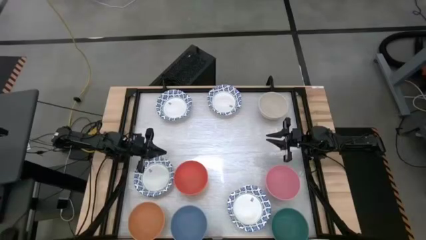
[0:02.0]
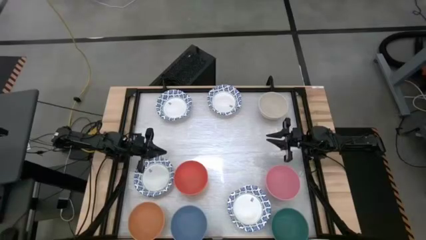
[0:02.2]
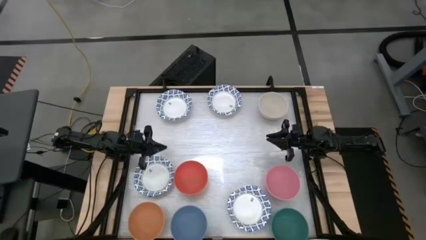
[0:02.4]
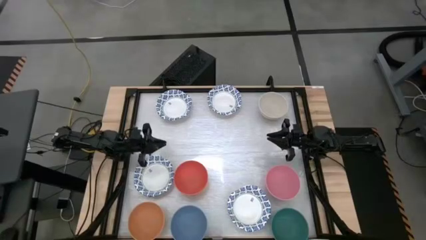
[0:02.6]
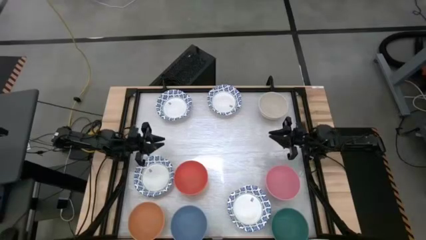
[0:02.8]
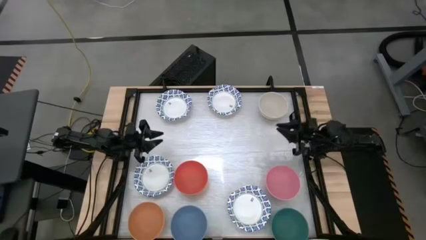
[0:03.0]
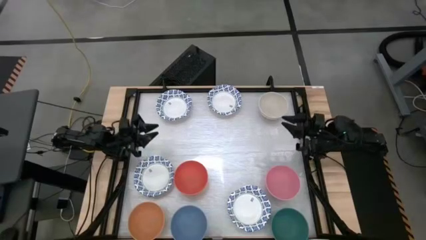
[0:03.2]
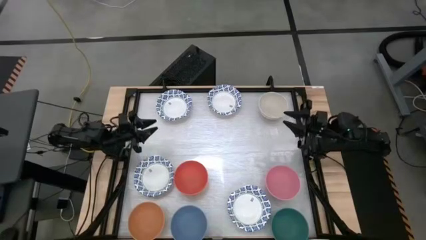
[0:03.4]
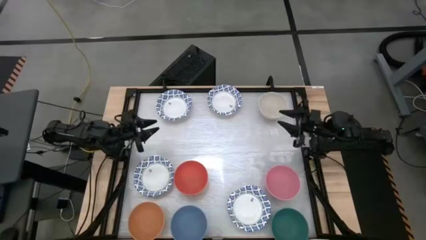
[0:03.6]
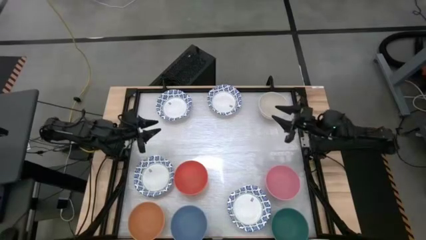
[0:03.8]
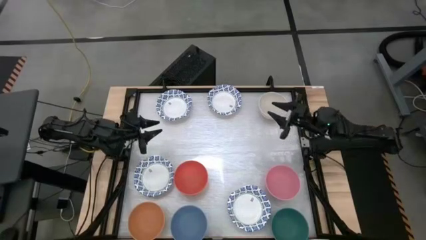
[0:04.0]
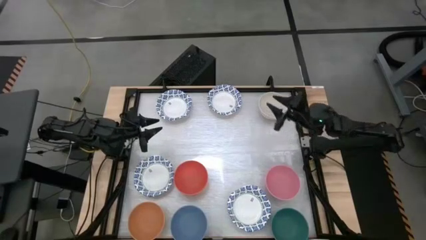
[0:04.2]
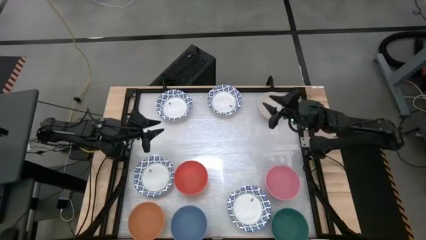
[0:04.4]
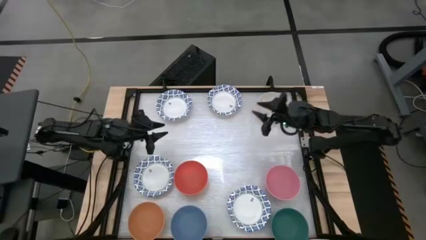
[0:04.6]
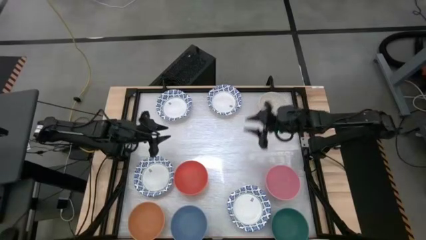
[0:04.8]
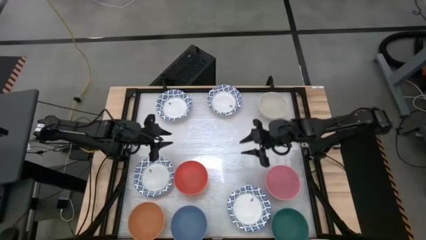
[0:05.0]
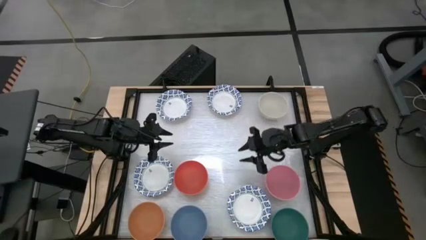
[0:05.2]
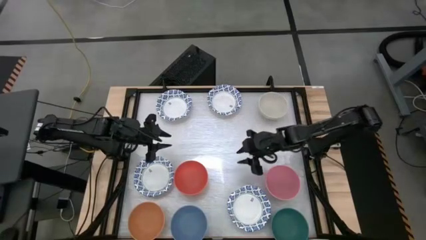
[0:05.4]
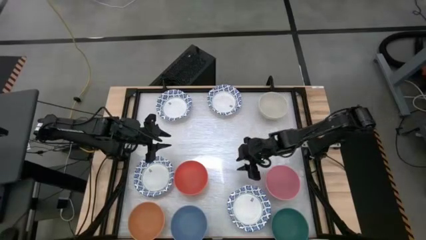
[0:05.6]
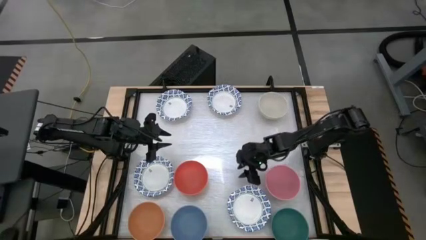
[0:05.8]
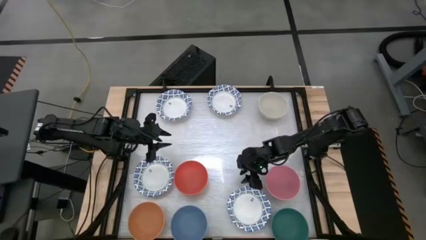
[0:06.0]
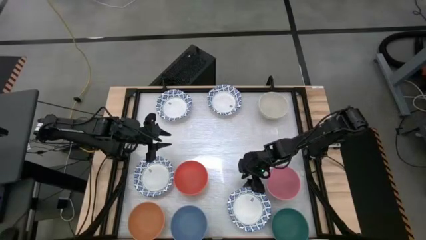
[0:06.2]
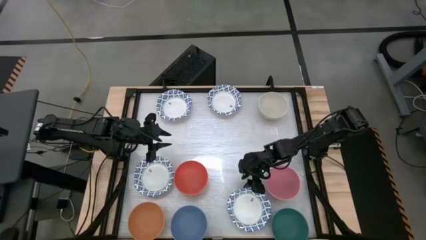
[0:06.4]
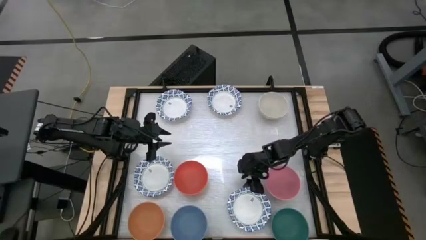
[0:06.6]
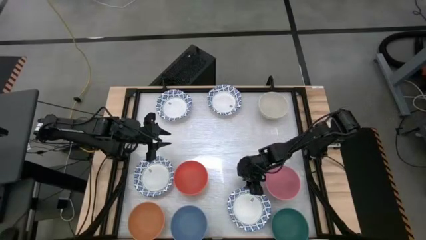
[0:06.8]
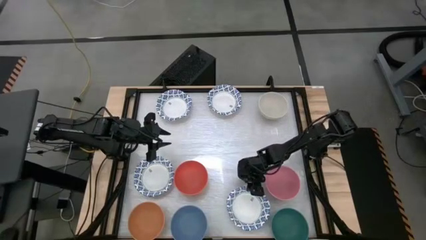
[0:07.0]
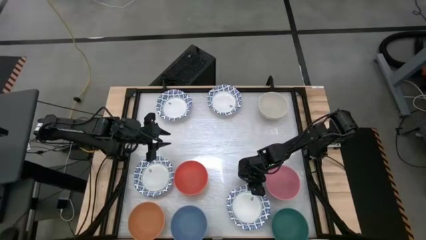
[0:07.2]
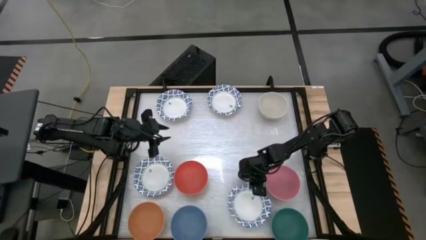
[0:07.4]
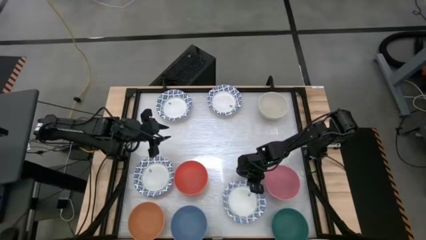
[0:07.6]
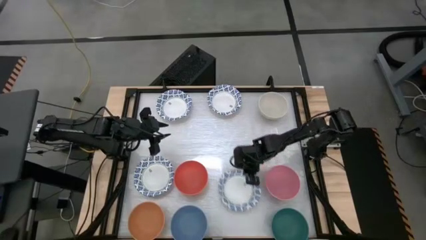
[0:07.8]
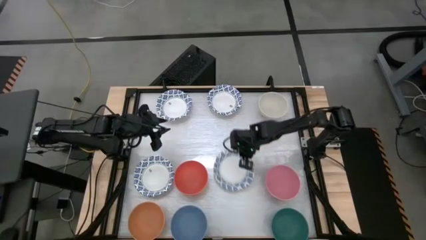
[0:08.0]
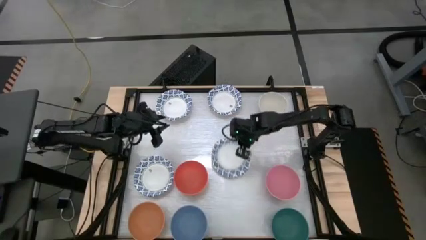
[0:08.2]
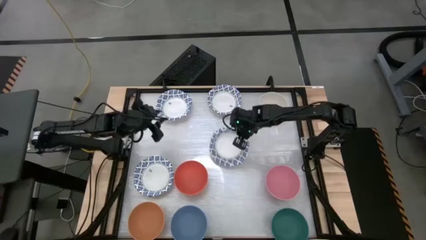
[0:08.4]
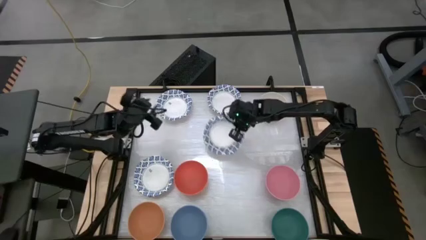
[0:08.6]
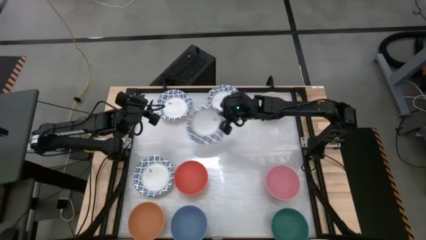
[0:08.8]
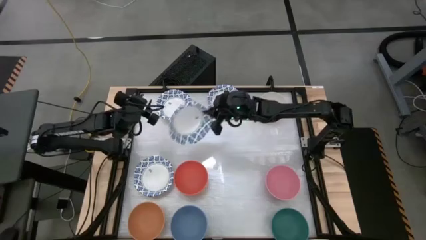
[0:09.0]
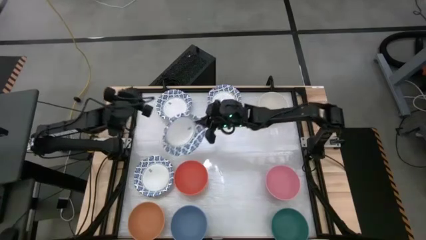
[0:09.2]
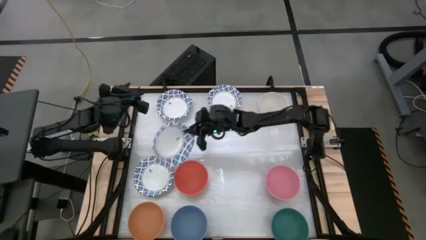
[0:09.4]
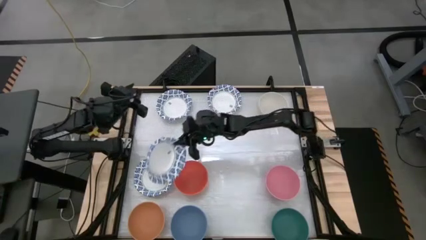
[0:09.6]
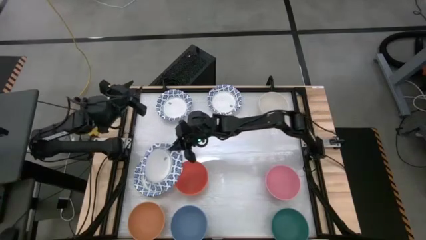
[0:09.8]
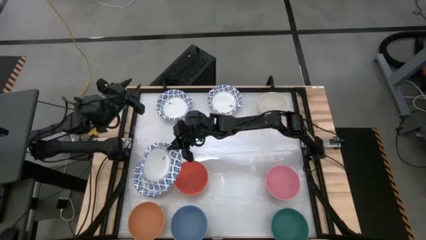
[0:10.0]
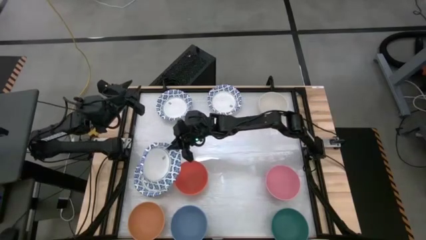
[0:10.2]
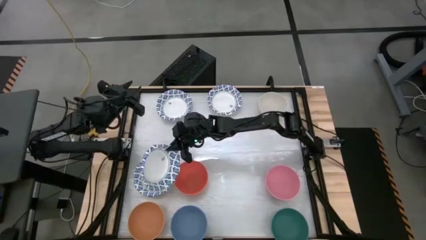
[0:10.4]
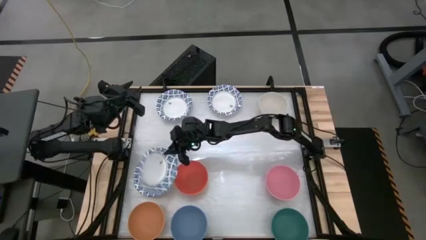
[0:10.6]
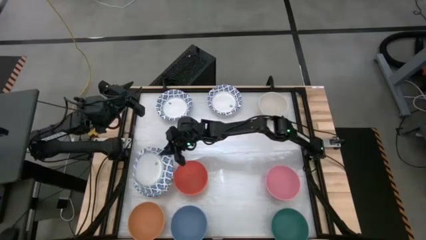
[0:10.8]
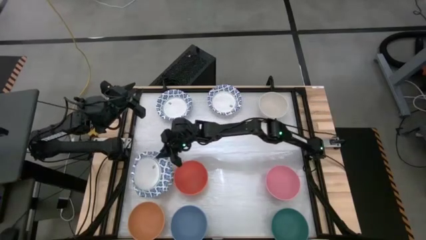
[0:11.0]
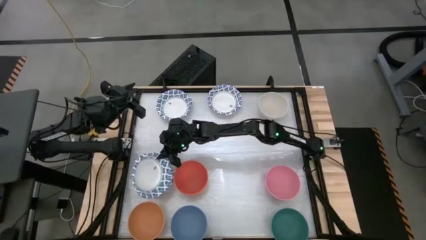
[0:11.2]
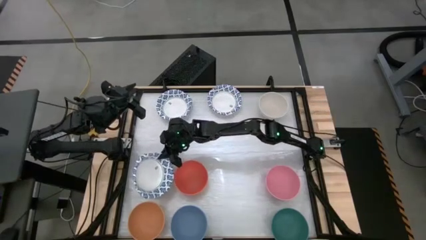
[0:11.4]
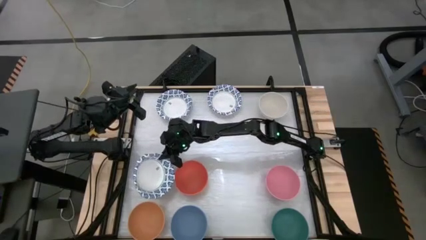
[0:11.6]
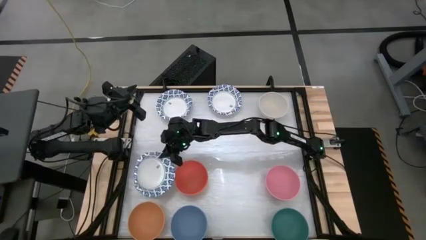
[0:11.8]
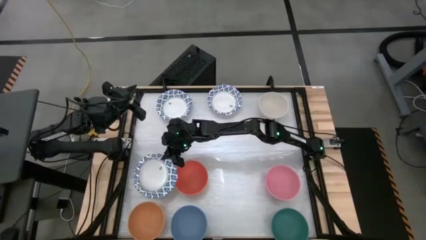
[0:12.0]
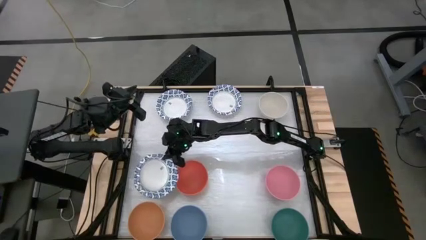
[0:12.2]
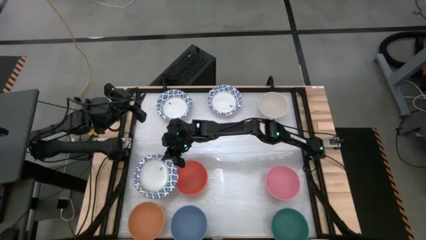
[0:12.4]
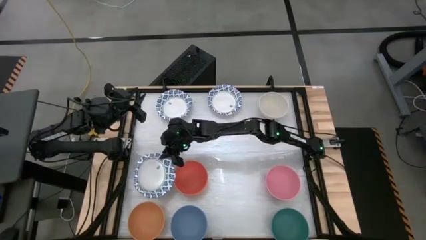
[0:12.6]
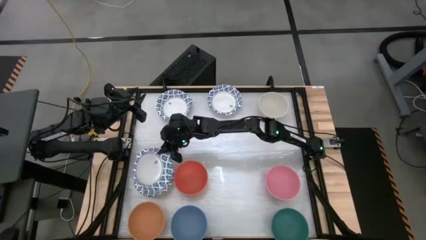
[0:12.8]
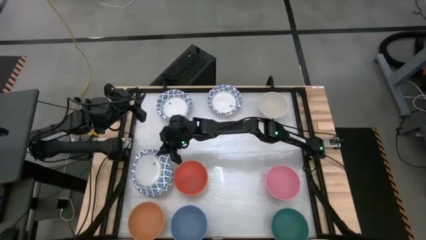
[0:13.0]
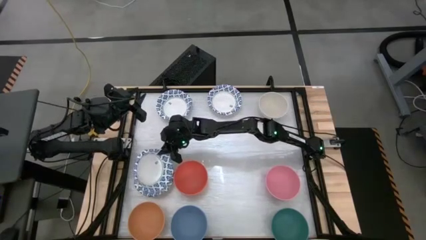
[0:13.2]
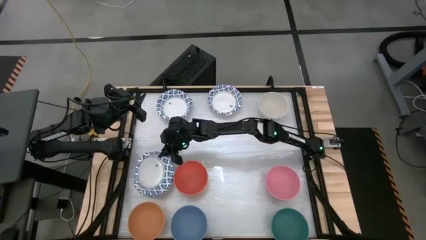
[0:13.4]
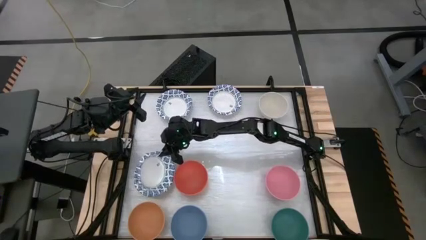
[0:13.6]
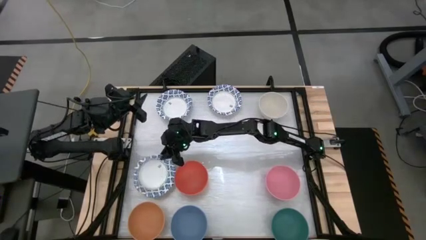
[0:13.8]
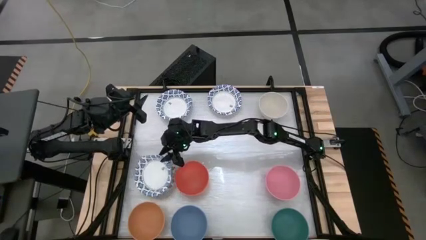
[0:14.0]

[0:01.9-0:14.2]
Stack the blue patterned bowl into the blue patterned bowl
